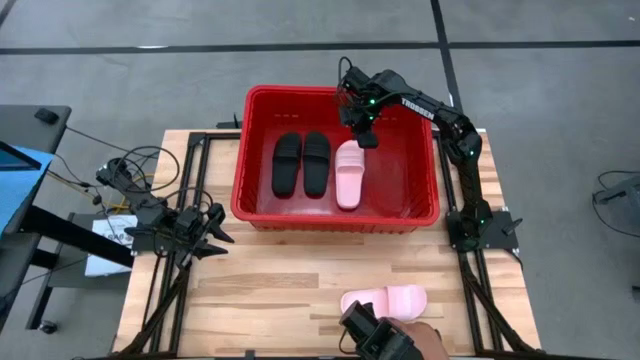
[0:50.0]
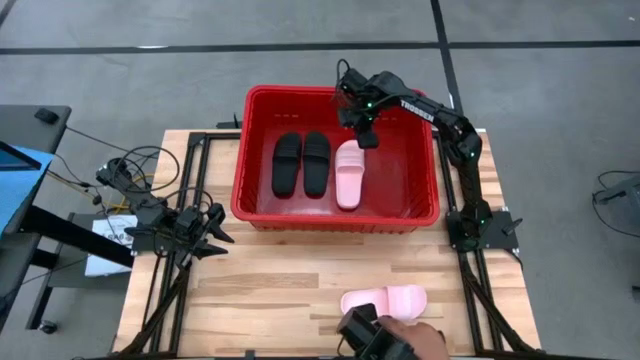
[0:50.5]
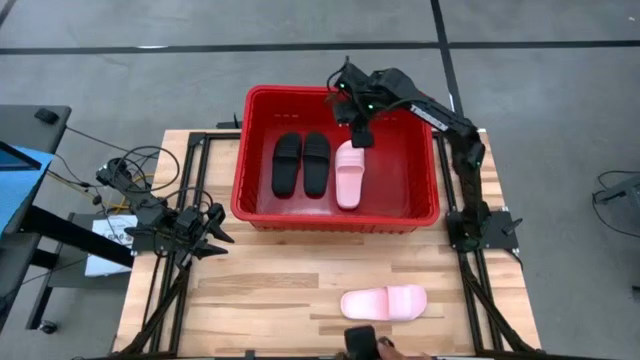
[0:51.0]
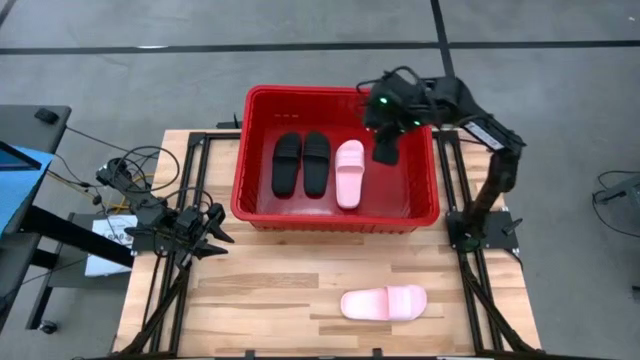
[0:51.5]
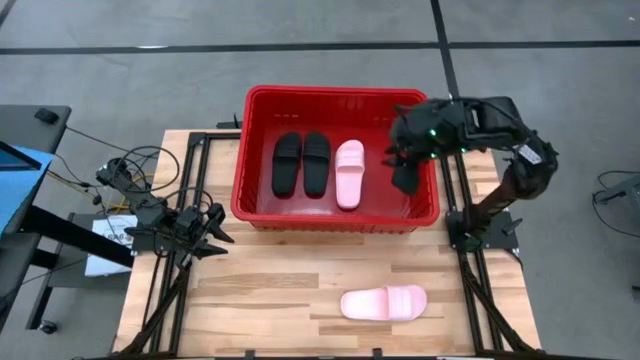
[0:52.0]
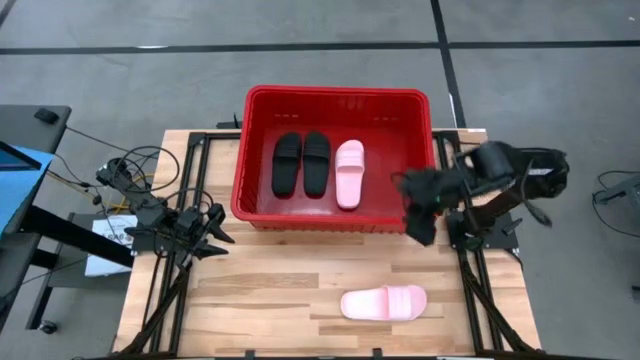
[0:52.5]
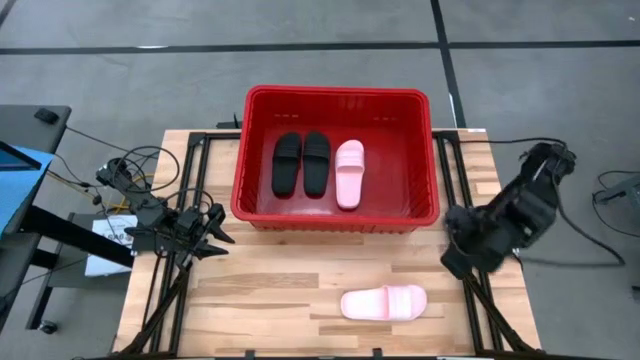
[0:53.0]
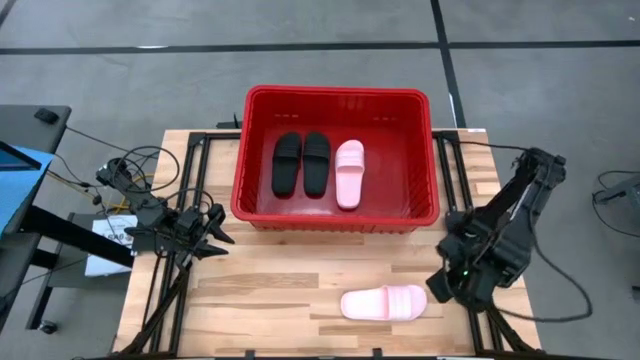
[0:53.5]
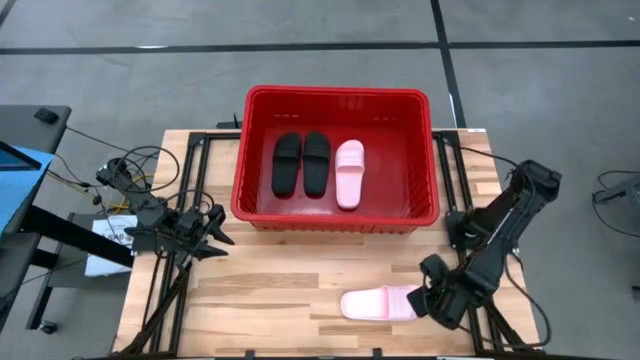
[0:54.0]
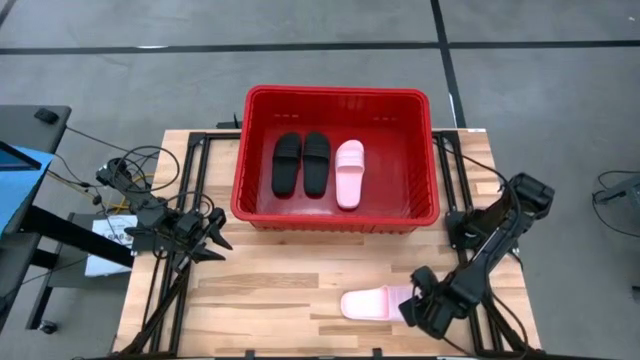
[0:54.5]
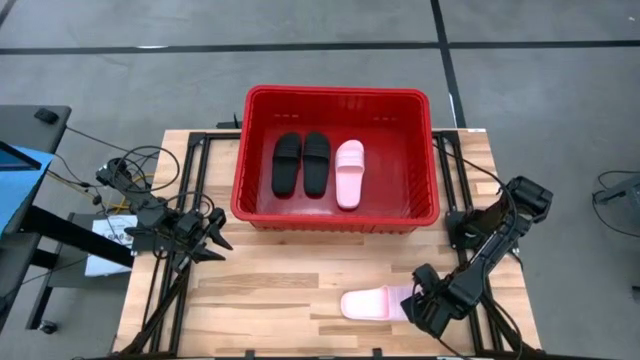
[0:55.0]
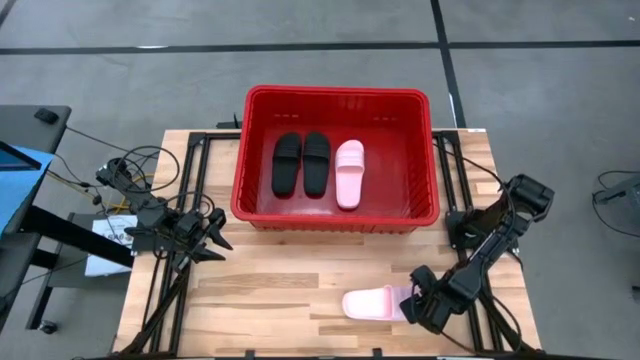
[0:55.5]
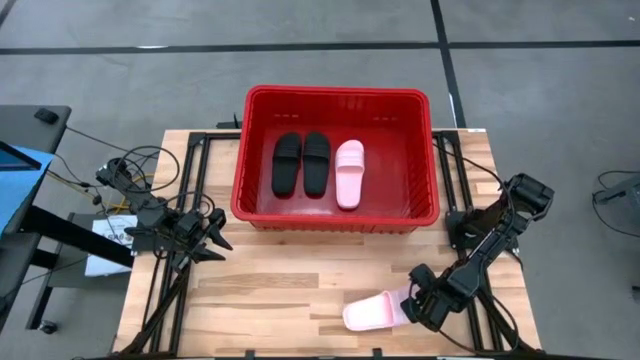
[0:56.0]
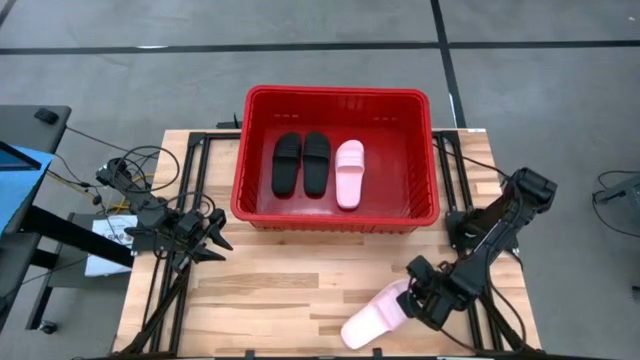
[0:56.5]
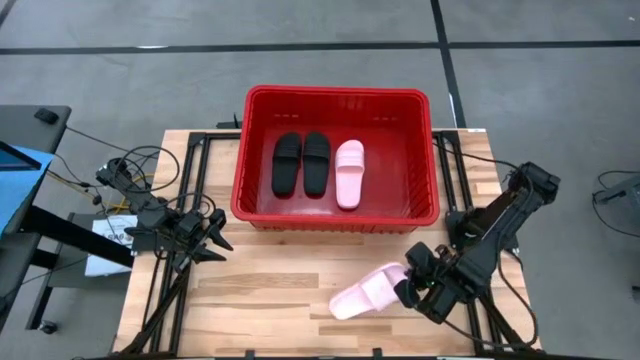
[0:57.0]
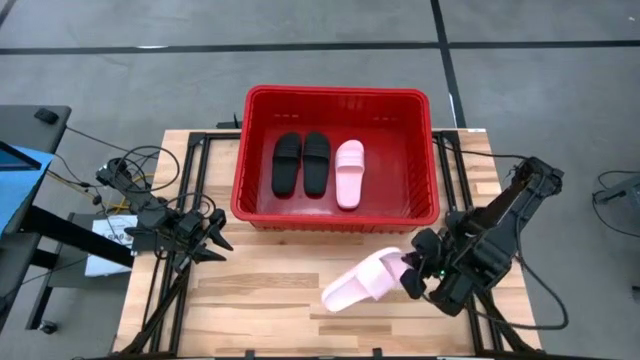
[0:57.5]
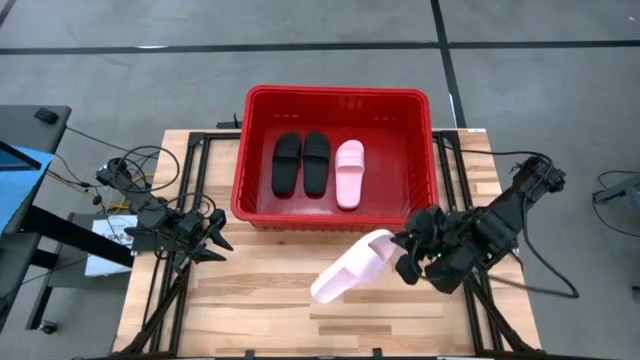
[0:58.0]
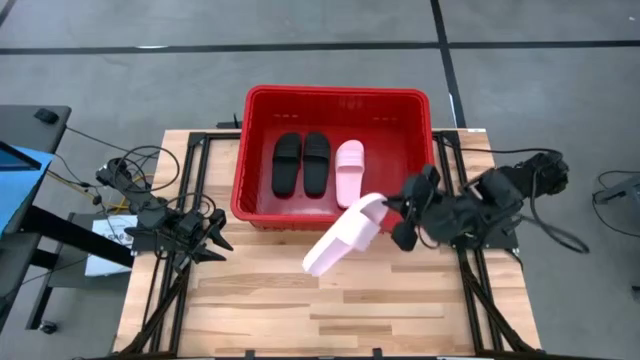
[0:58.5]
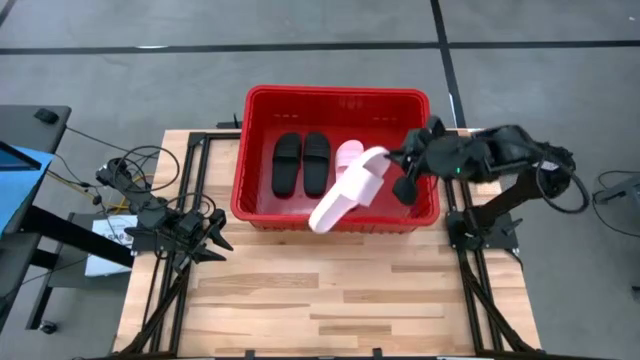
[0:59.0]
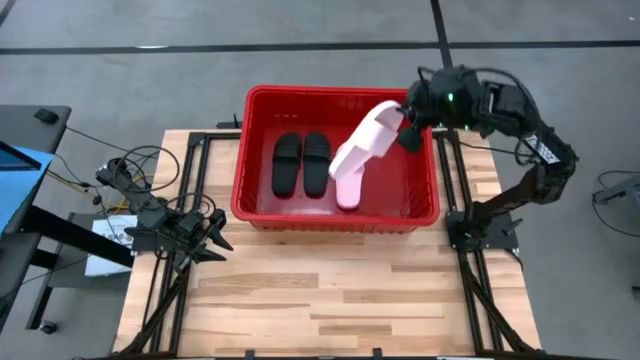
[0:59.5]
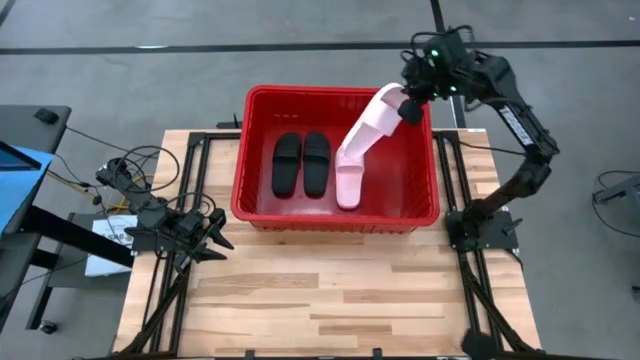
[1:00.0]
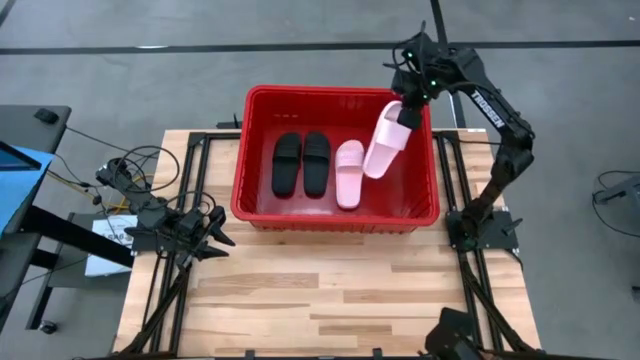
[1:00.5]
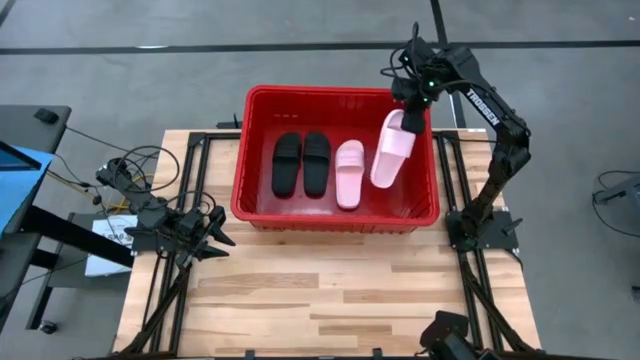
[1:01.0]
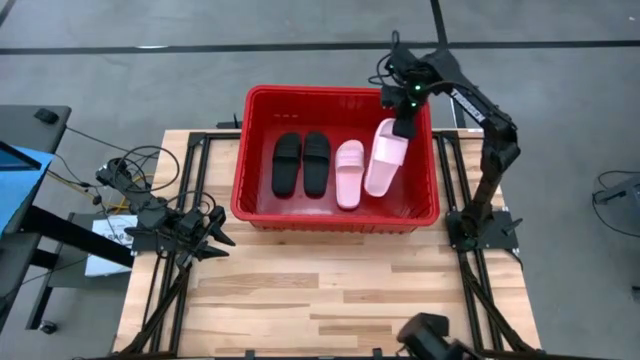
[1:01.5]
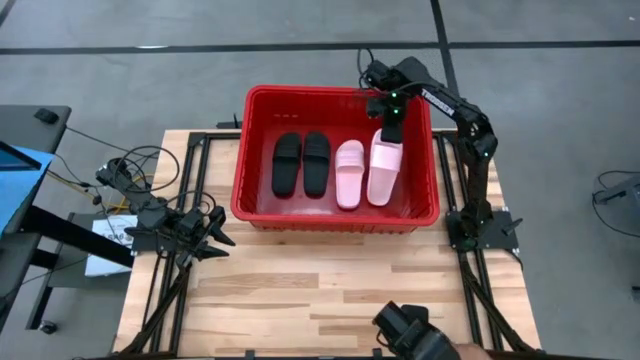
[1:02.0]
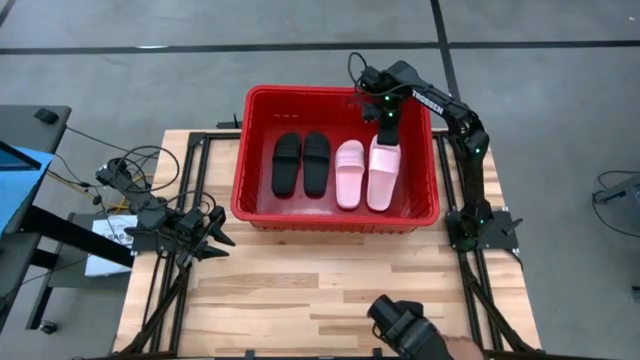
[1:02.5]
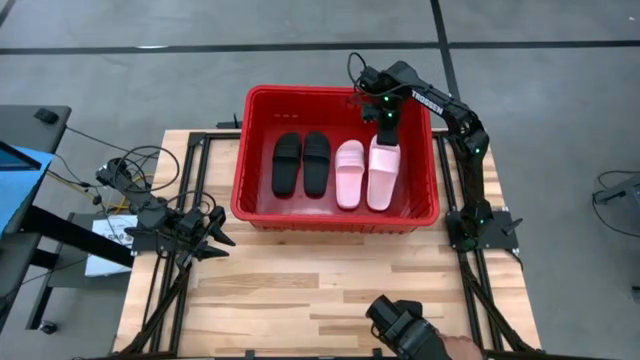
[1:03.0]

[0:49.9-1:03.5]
Task: Pick and place slides into bin
Put the pink slipper into the red bin

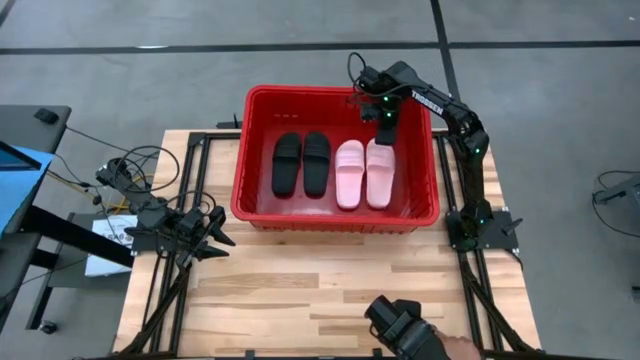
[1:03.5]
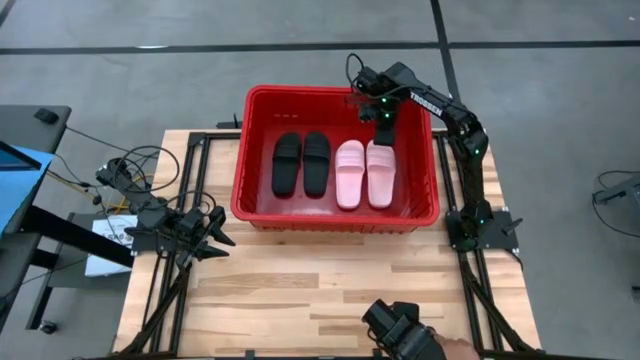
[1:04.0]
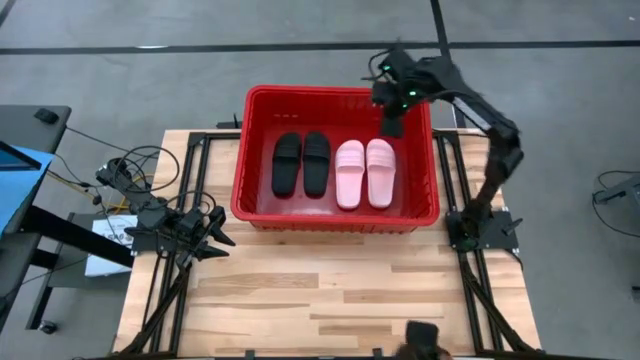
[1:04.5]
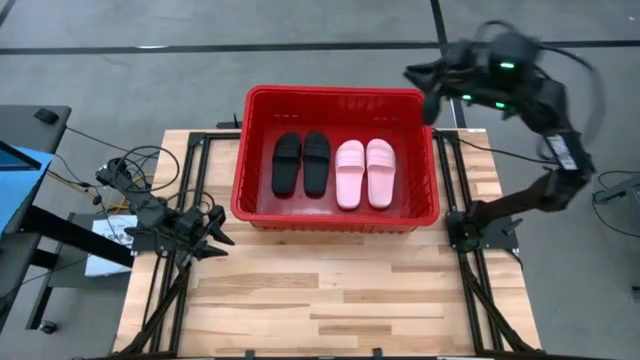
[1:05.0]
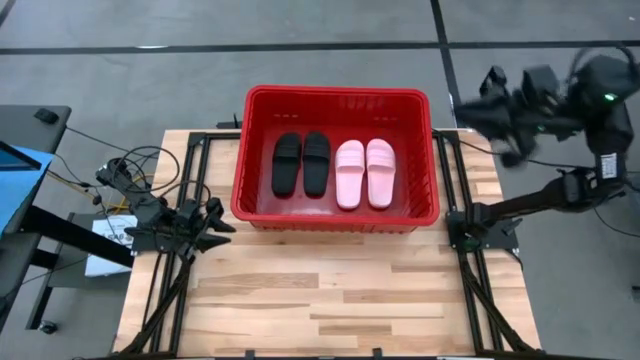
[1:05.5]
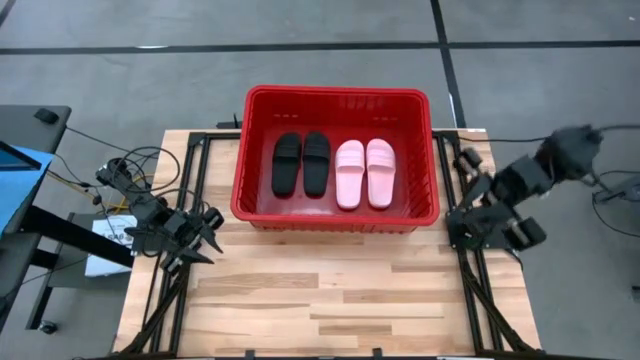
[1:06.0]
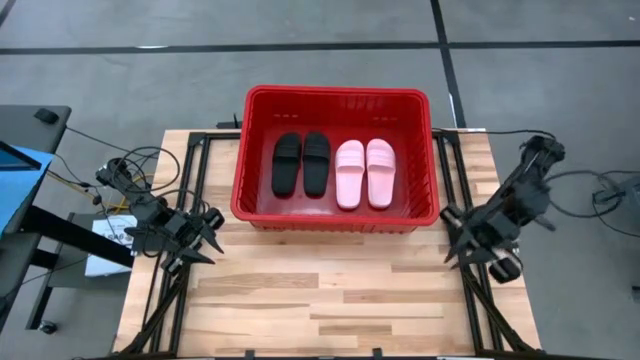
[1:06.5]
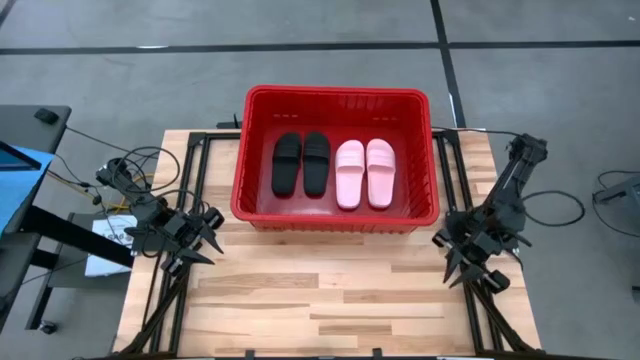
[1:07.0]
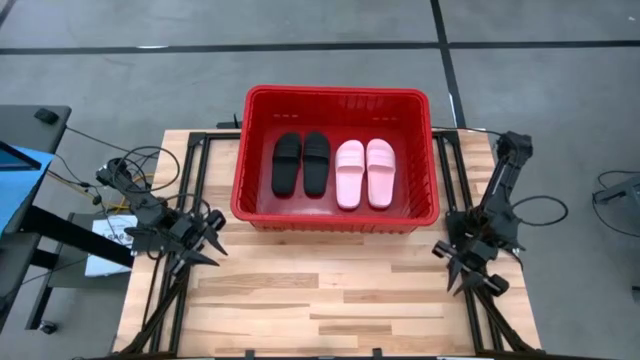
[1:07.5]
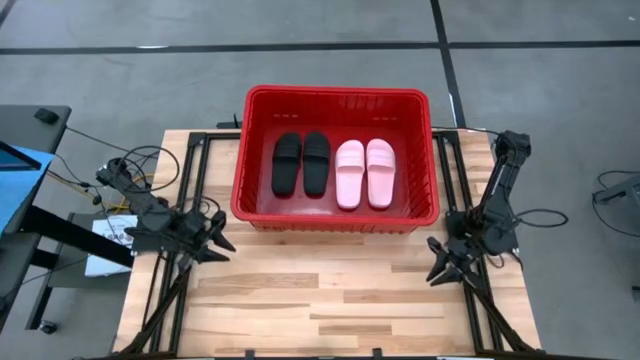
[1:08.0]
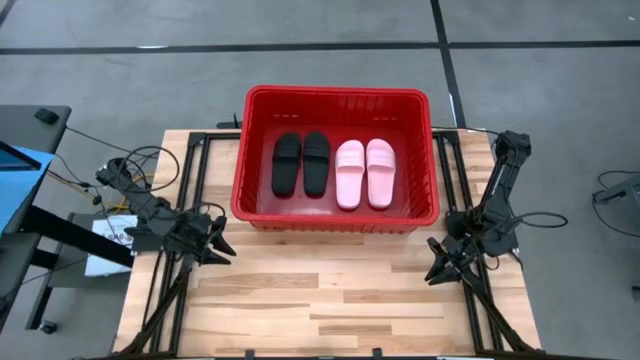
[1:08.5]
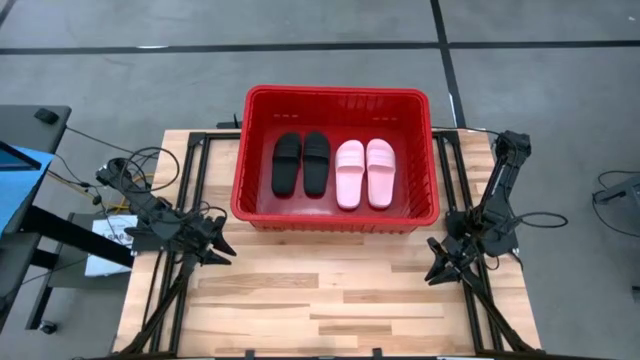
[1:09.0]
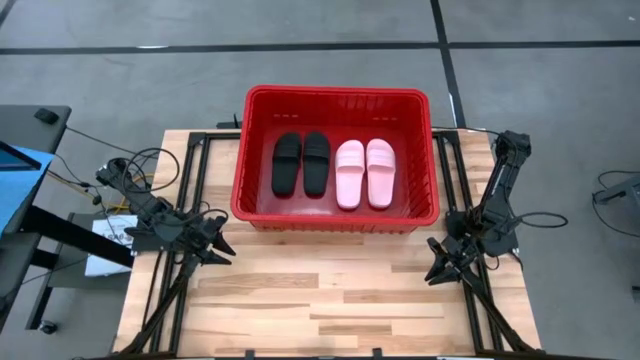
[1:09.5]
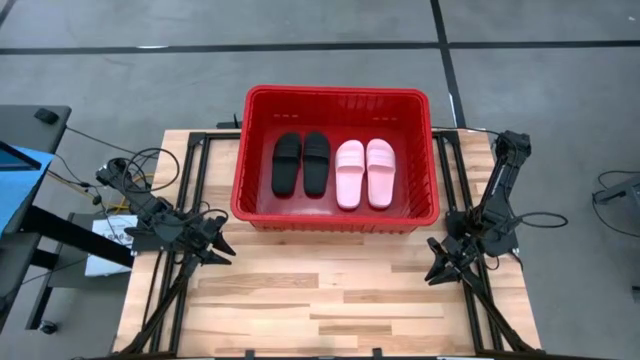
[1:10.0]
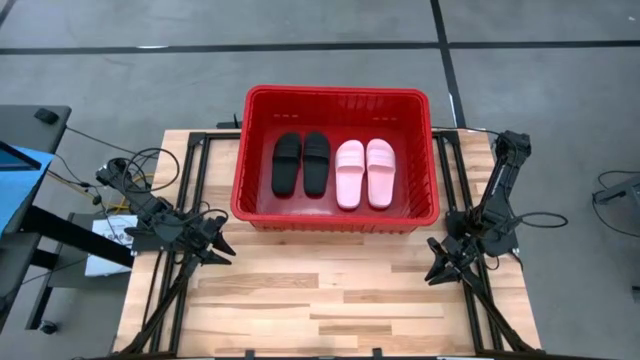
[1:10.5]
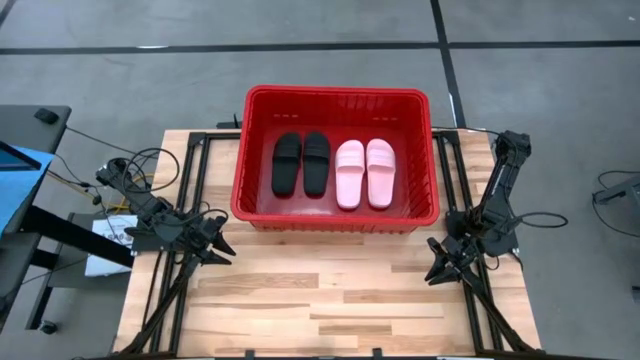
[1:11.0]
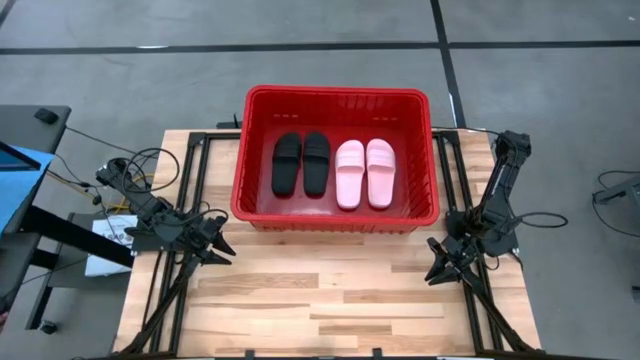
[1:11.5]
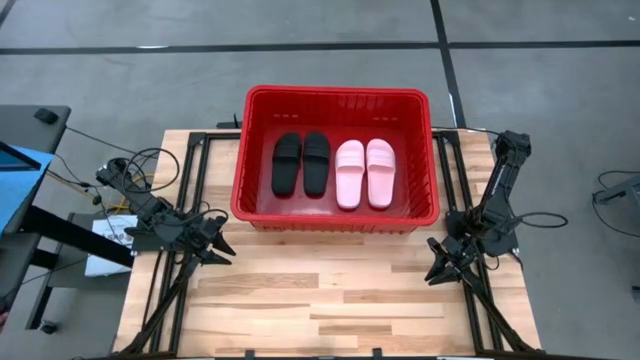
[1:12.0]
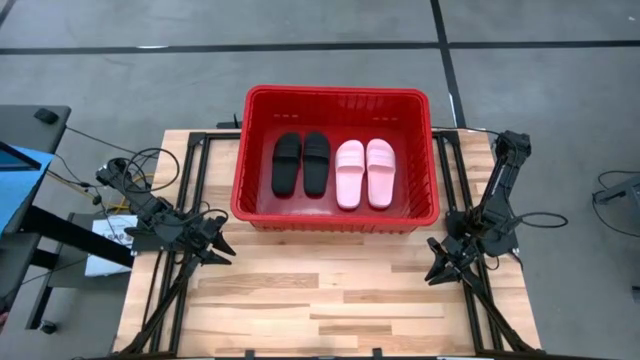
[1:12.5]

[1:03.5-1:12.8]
Return to Home Position
